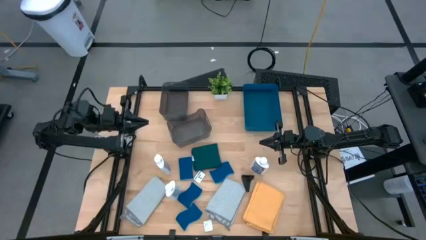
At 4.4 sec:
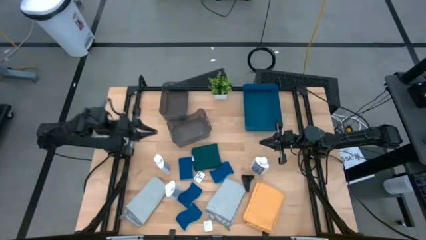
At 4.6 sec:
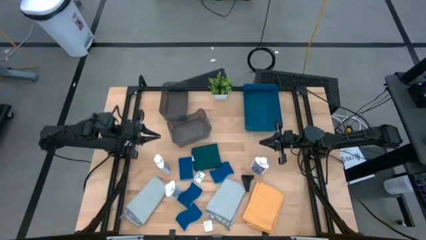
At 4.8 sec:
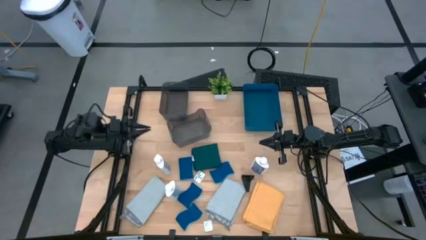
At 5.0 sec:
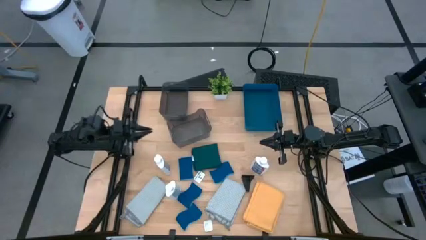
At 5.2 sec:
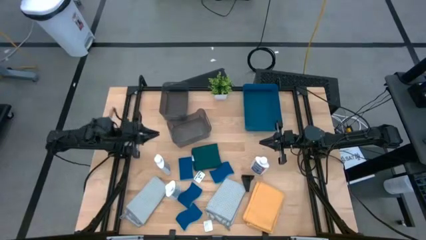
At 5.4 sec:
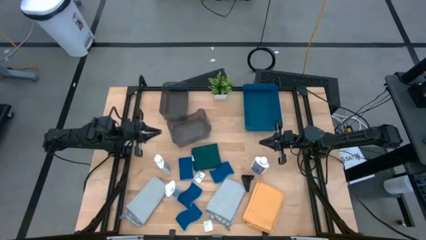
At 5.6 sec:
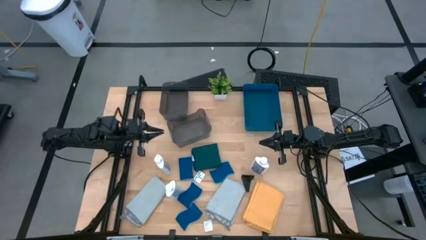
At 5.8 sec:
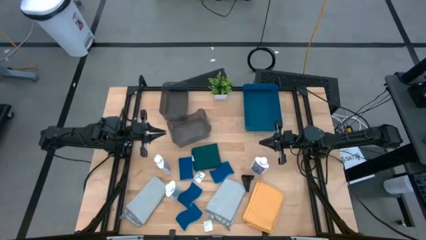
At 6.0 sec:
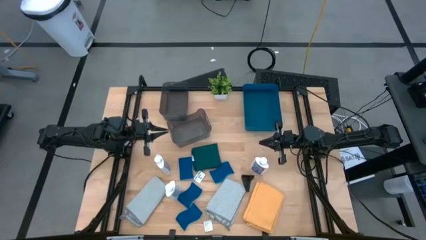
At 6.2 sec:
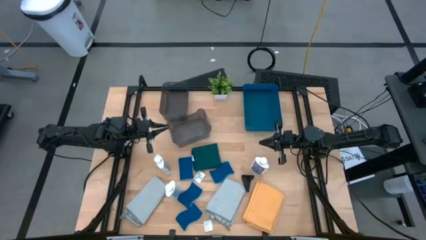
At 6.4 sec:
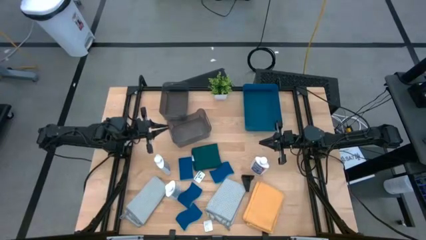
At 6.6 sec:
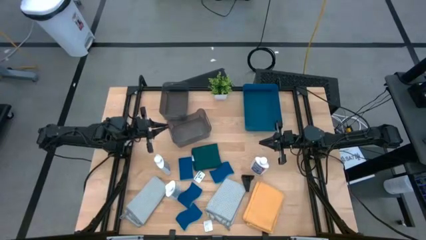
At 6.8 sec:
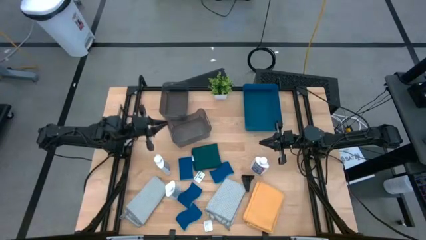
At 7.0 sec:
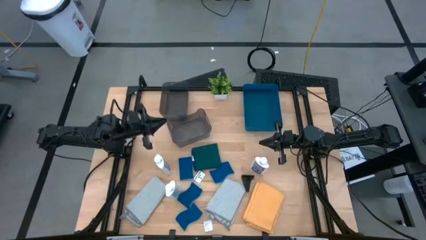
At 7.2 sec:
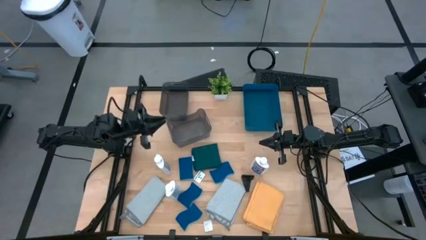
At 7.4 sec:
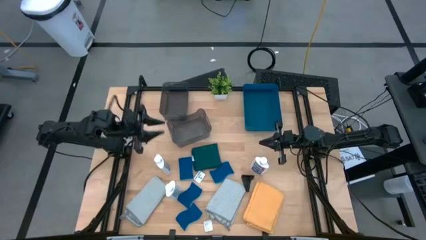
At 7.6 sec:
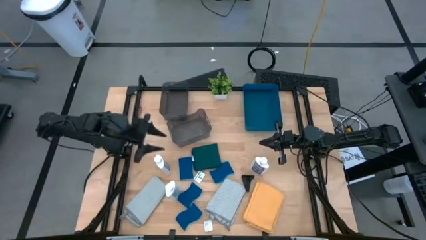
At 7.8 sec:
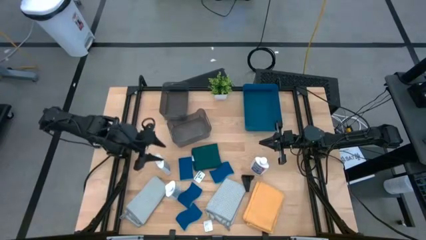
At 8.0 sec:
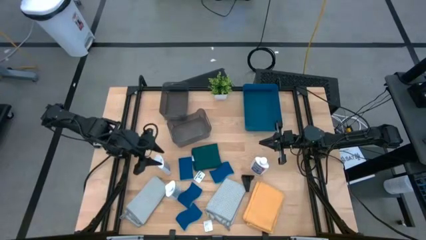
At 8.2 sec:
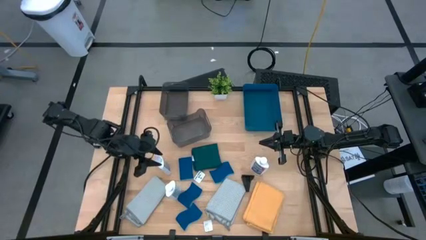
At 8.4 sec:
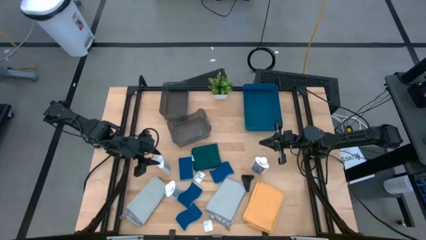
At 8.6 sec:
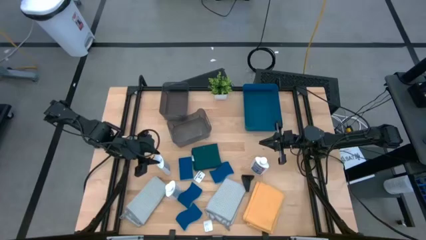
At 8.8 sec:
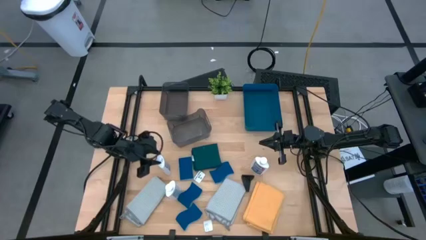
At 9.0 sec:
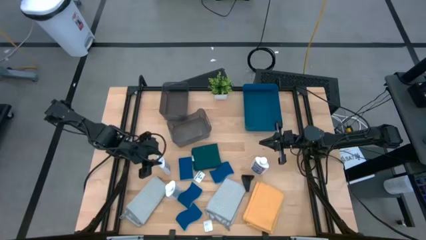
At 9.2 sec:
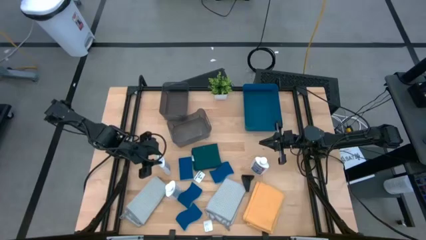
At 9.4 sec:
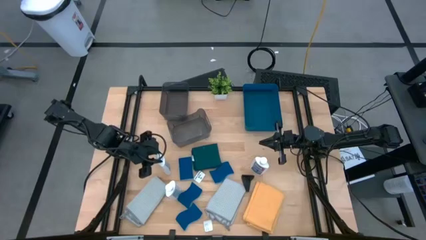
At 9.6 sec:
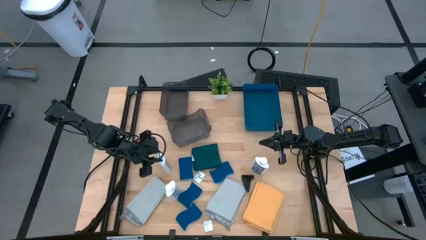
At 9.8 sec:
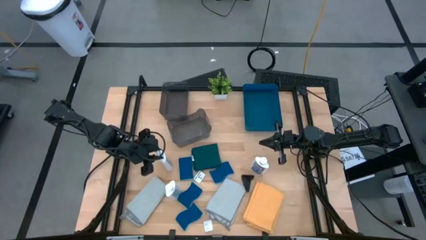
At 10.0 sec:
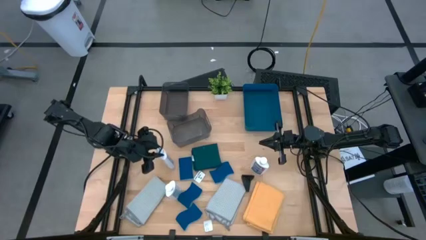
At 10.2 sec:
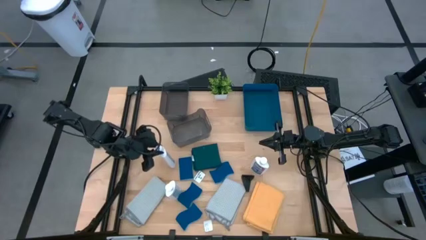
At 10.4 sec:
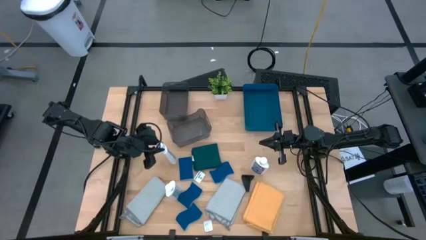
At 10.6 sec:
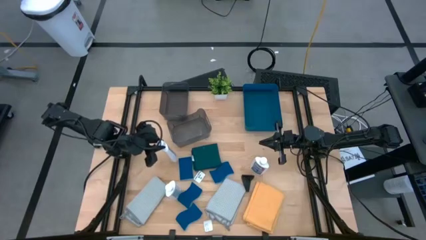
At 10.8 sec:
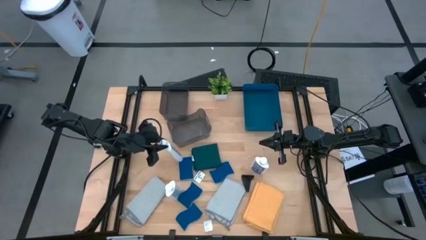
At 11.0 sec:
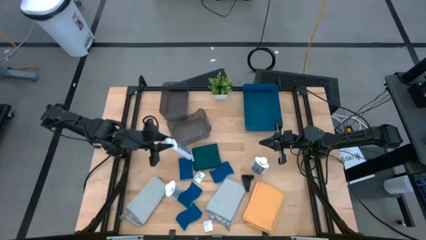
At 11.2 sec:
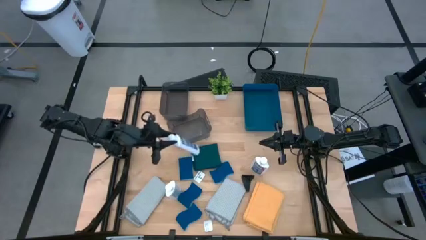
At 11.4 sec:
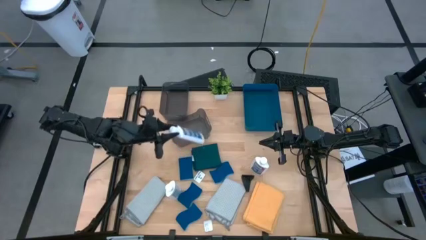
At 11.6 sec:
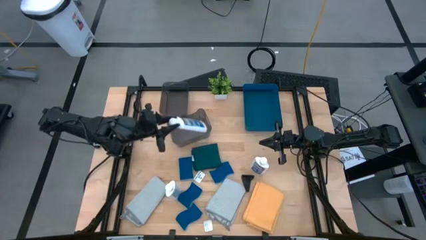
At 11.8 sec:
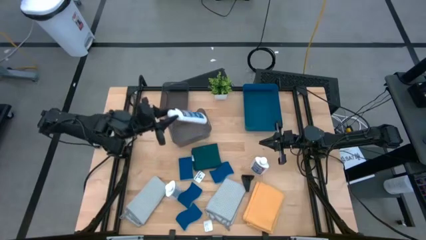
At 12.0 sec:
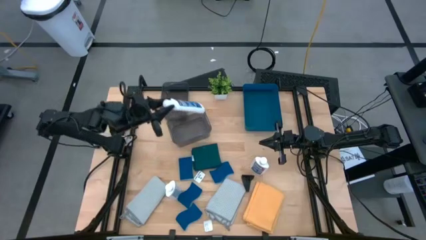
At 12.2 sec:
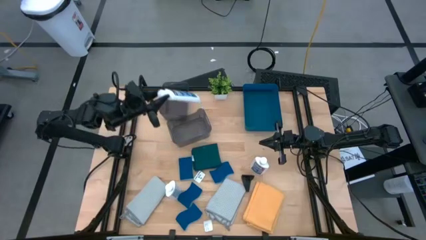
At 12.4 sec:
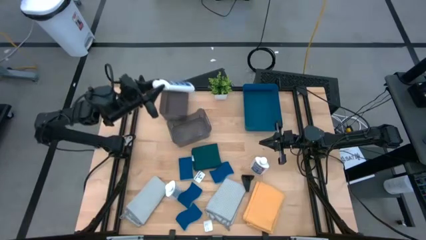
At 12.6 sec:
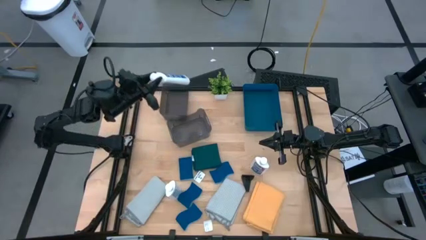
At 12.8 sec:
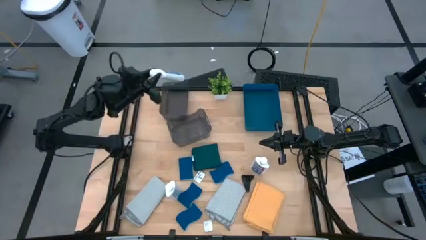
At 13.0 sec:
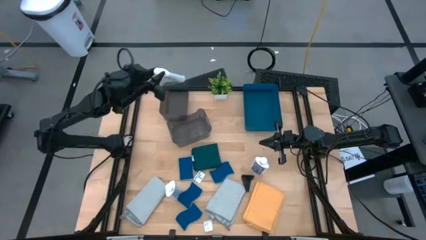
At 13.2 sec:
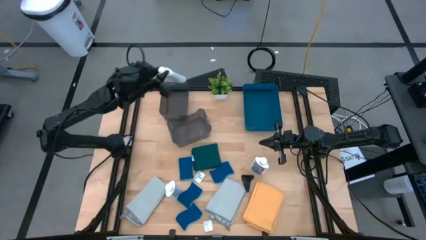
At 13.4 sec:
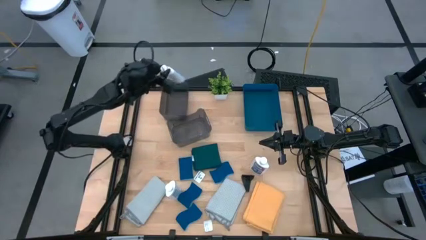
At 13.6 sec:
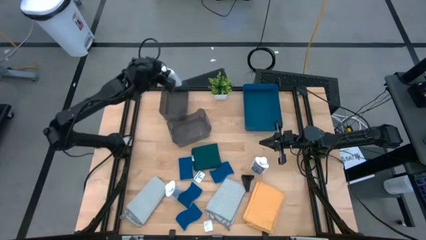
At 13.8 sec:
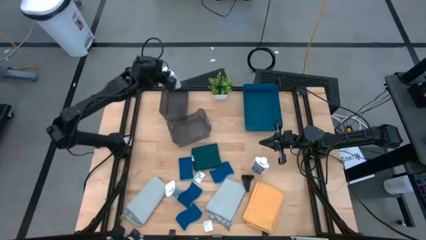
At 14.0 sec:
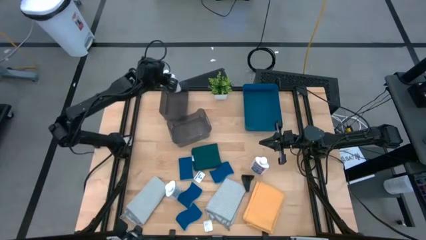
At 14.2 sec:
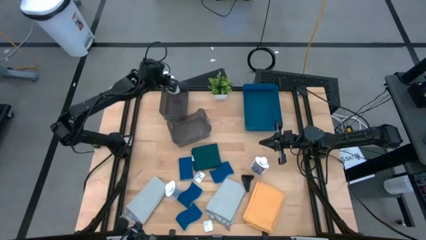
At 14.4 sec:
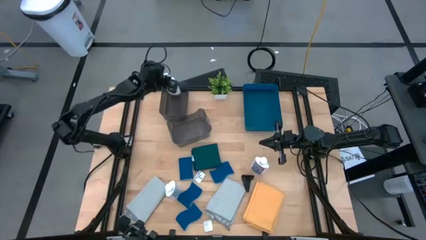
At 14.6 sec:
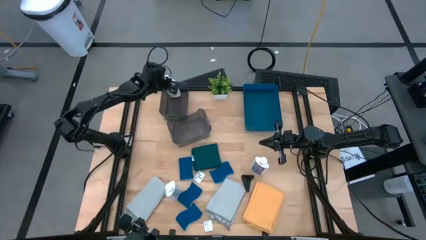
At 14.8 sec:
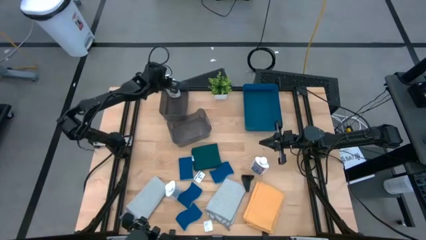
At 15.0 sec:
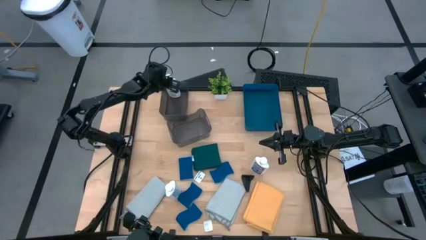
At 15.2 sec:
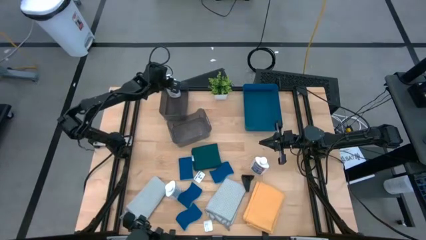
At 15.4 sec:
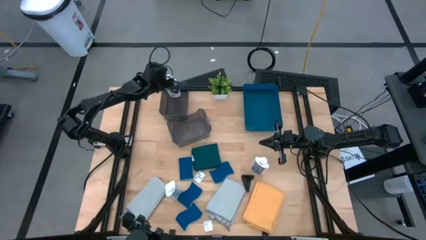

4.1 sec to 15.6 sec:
Task: Pick & Place Kitchen Items
Put the white restorer into the top black bin

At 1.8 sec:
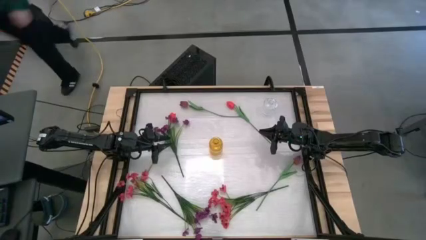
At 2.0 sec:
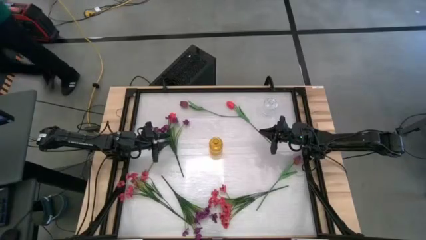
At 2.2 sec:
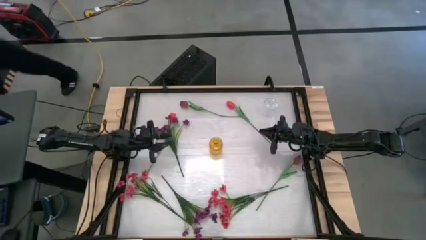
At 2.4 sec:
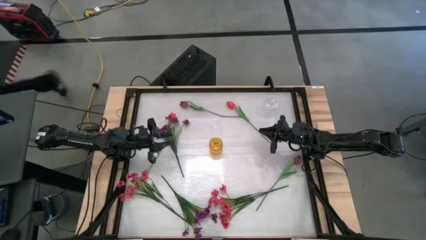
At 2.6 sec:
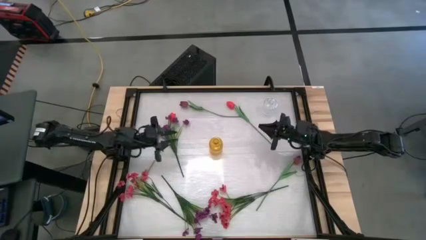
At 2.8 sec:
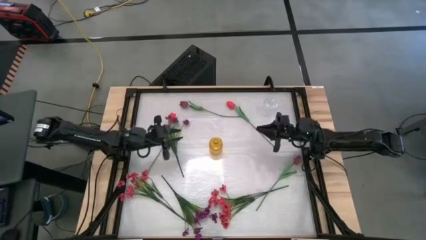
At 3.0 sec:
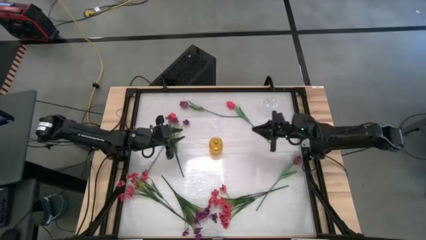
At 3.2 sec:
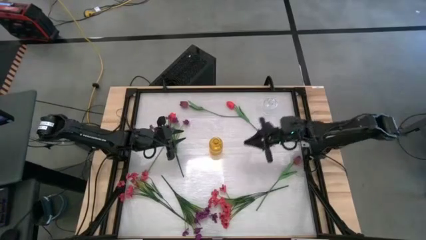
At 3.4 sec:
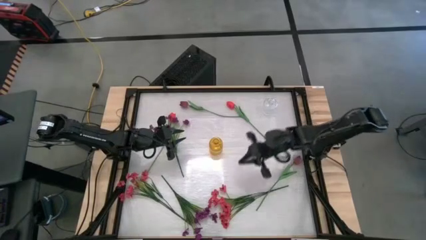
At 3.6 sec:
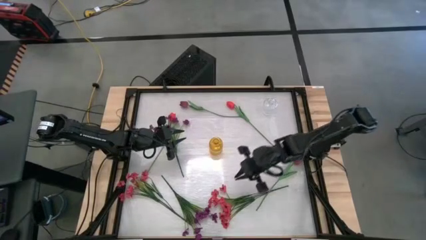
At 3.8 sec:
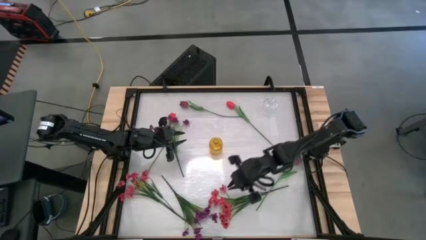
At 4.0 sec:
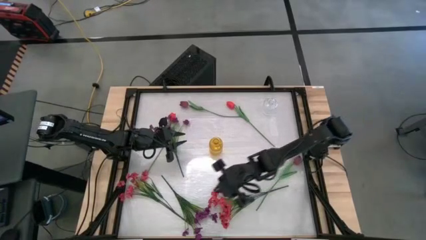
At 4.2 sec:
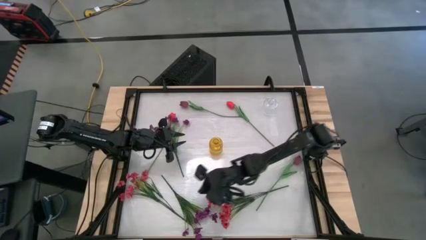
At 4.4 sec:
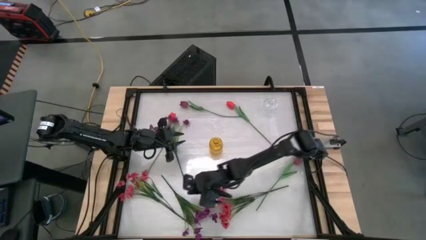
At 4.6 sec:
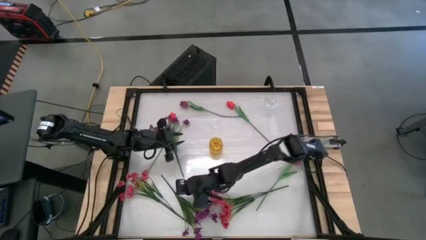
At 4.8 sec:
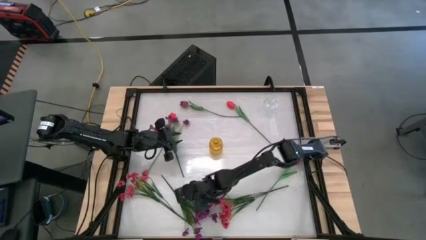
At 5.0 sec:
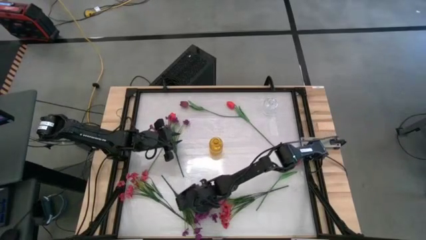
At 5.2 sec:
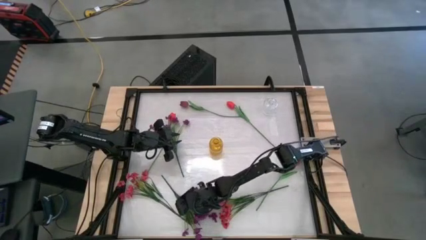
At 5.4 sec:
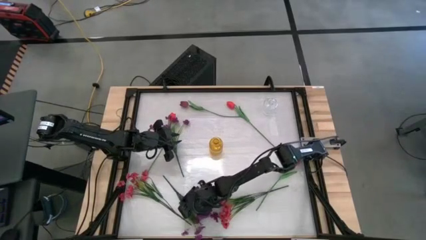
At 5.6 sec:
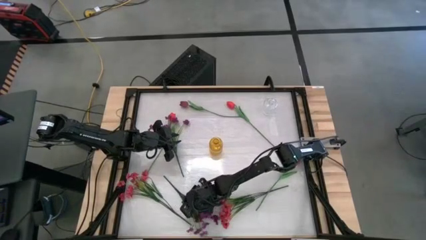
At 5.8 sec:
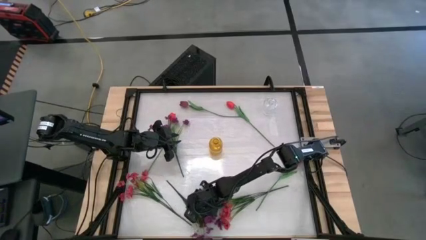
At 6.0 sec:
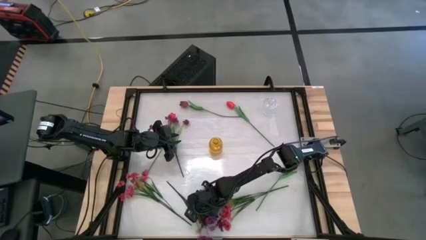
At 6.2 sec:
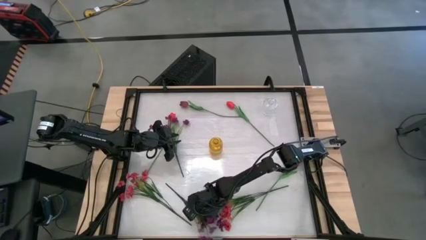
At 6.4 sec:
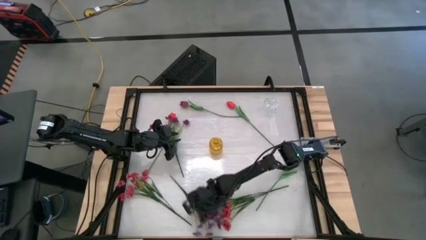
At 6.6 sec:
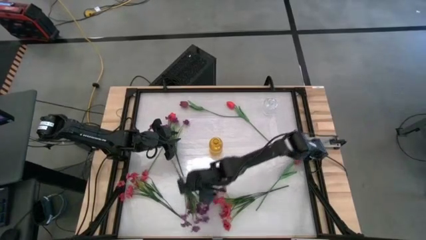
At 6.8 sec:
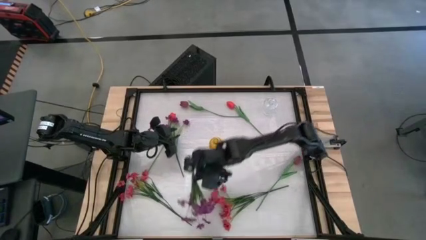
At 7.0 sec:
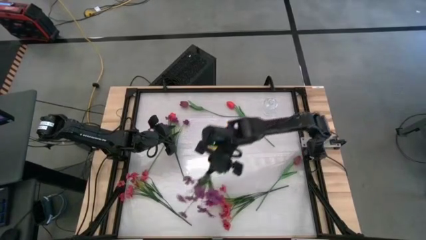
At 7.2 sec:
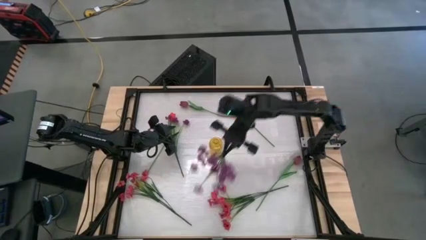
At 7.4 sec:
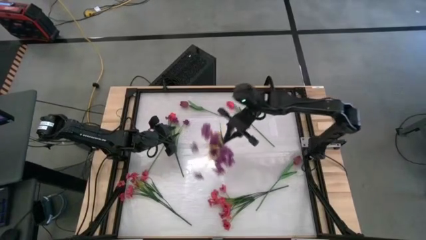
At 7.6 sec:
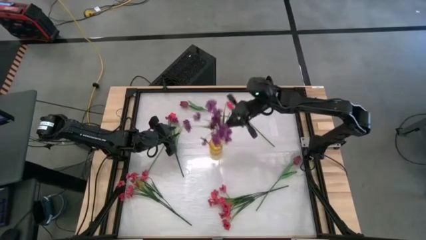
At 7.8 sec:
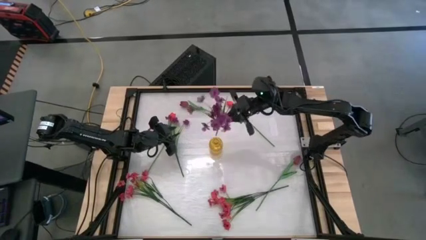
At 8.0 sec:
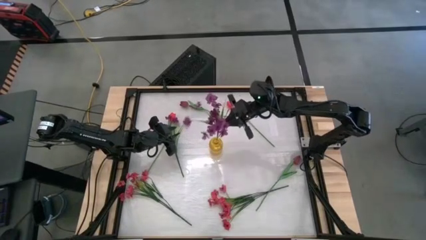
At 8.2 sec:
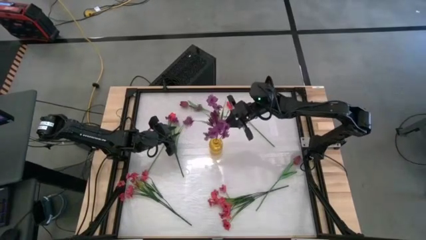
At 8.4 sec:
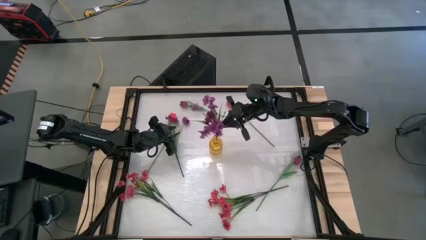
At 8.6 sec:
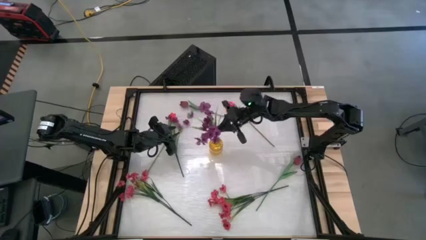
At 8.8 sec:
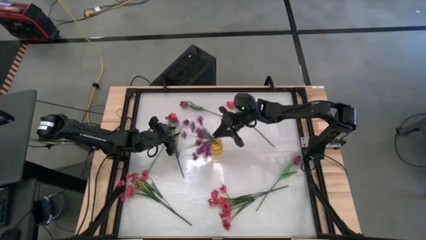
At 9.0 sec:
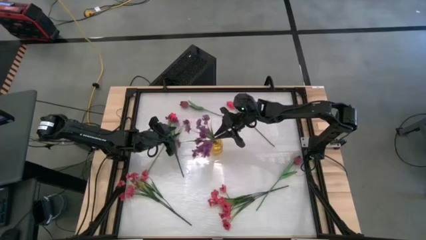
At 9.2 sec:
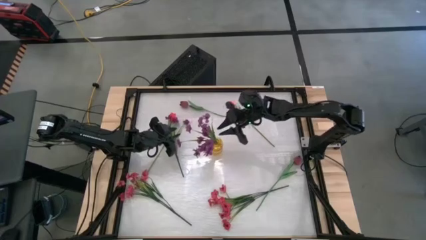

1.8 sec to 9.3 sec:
Task: Sort flowers into vase by color
Put the bottom purple flowers into the yellow vase
